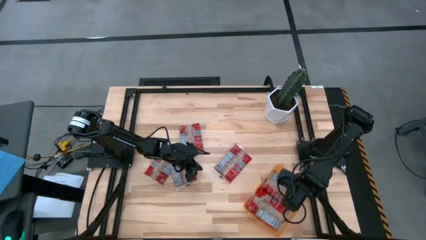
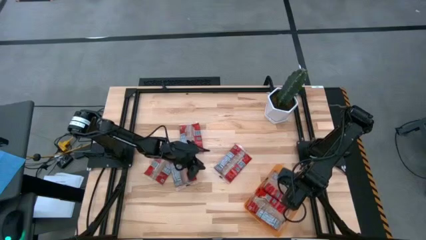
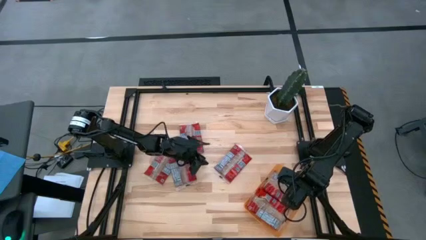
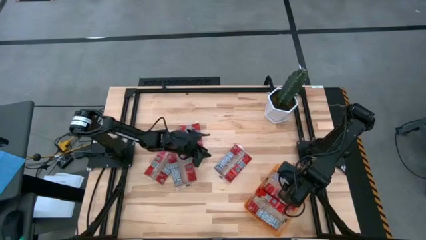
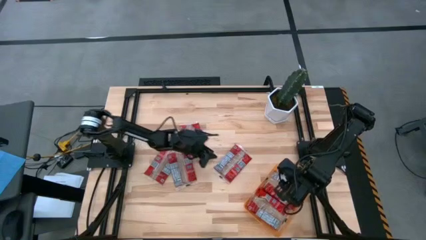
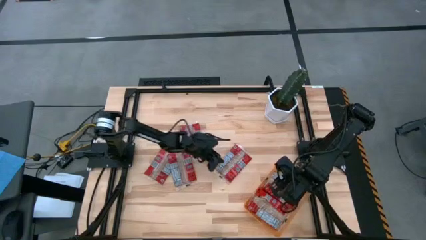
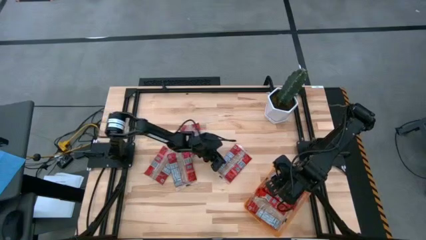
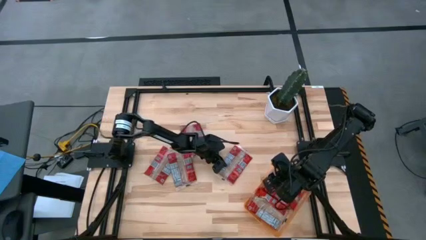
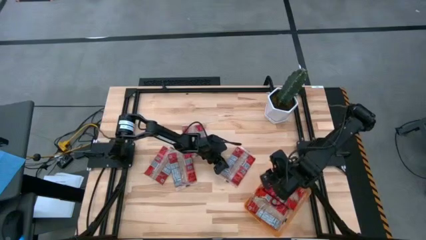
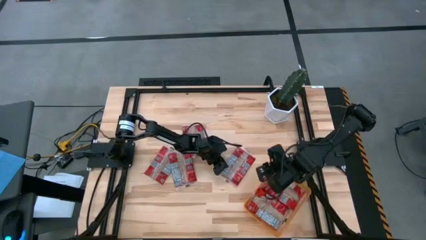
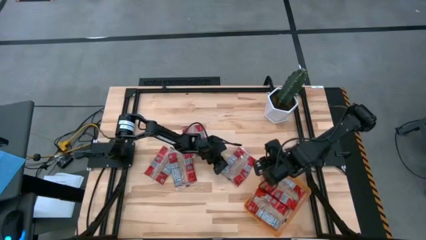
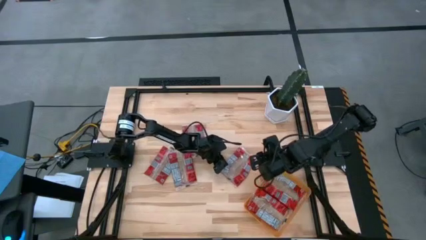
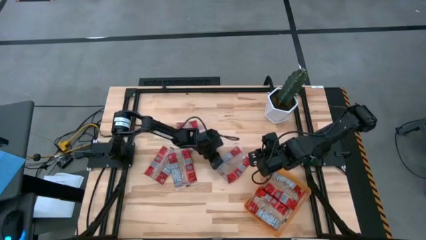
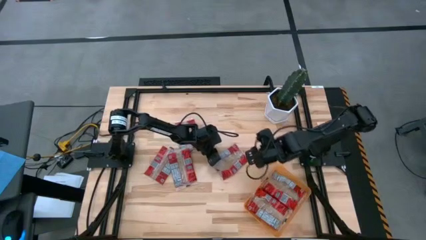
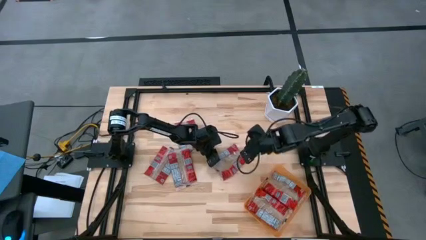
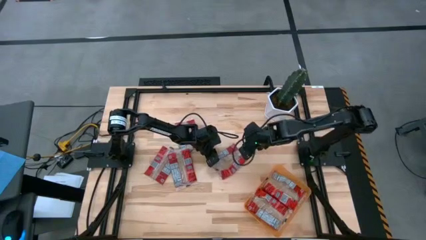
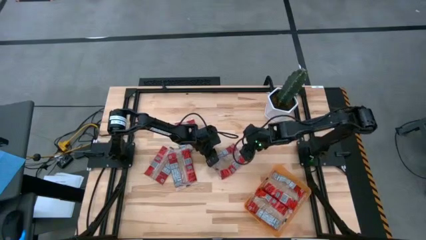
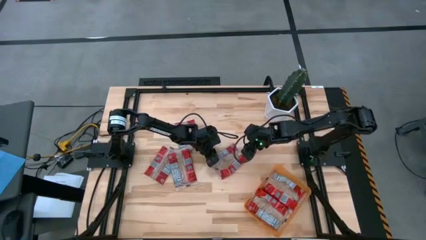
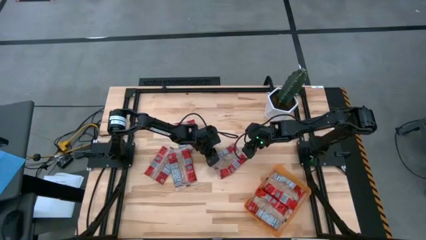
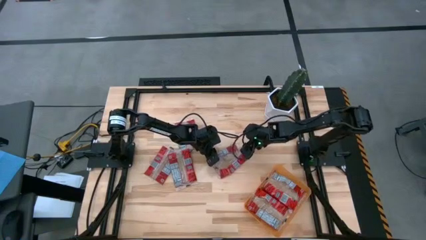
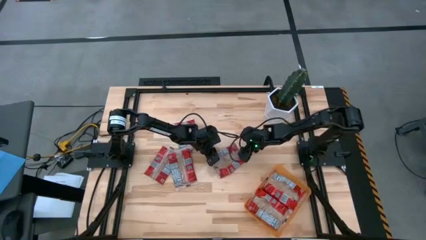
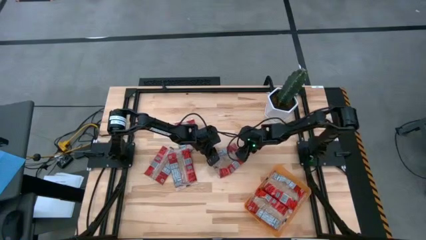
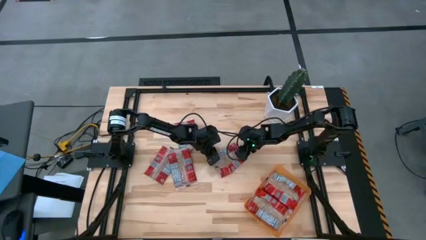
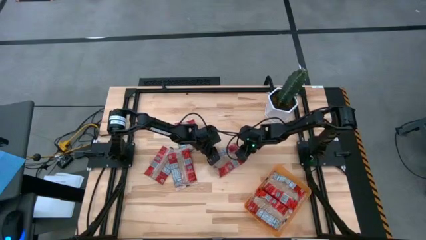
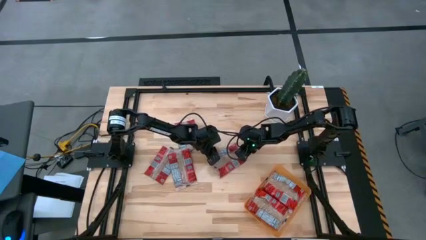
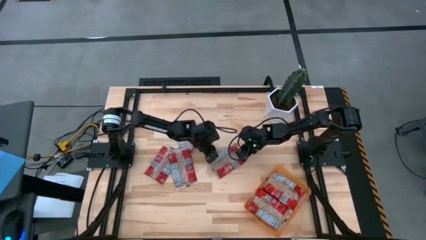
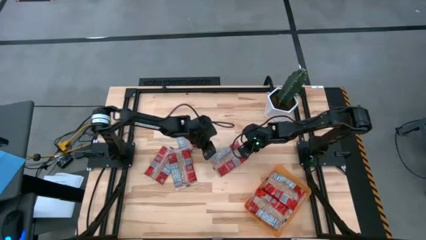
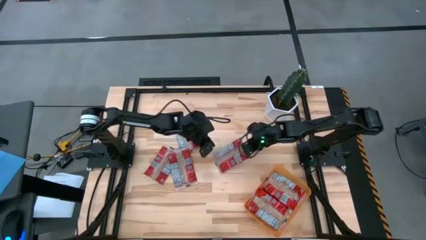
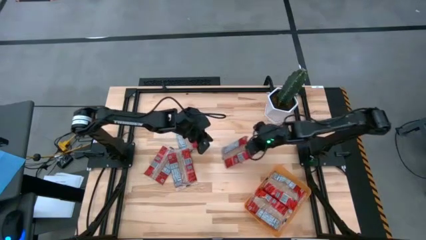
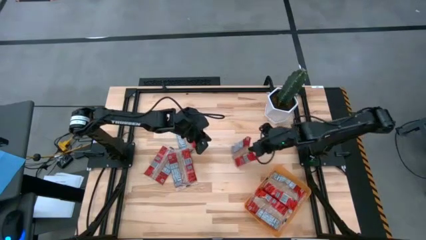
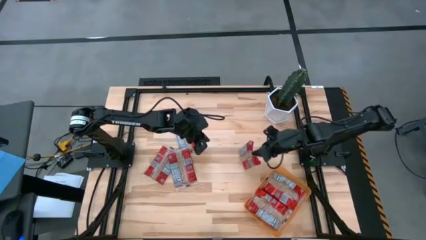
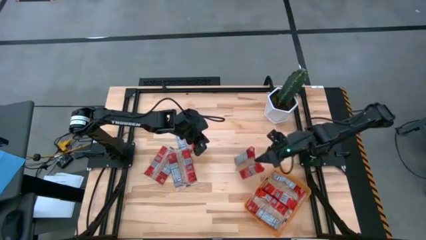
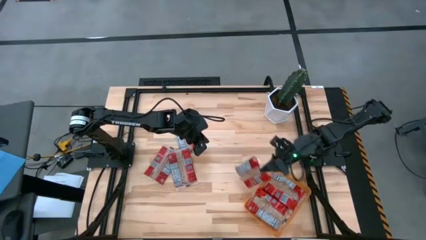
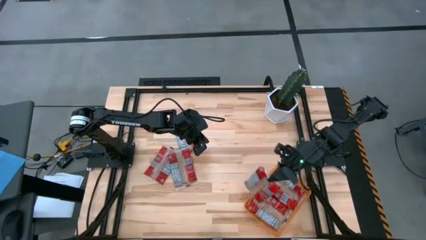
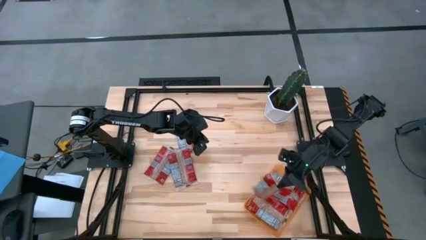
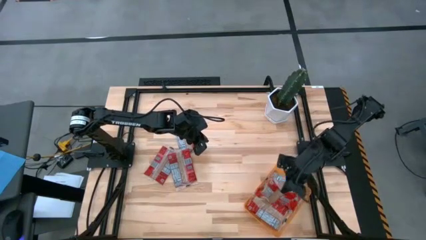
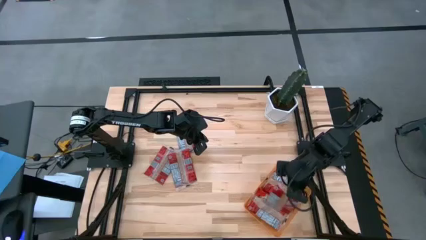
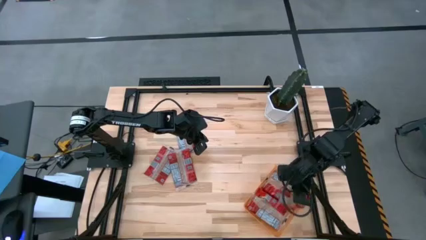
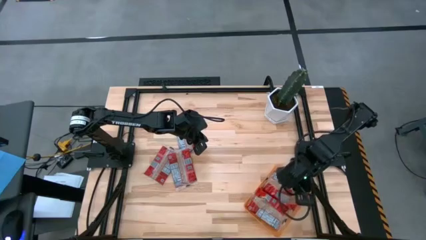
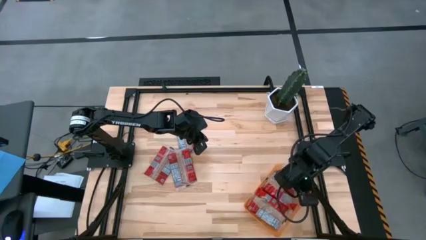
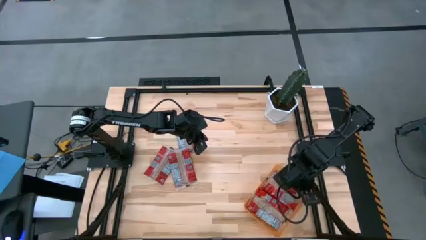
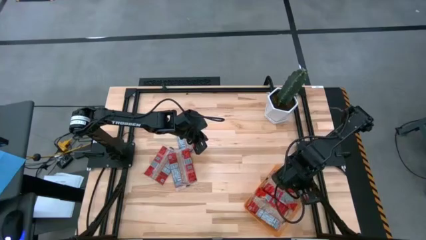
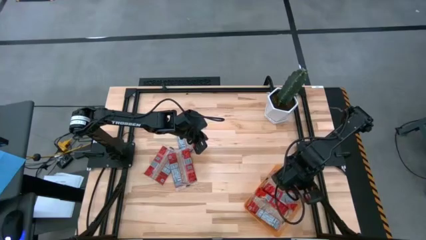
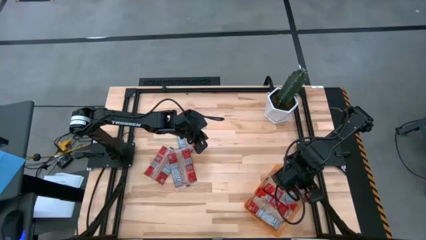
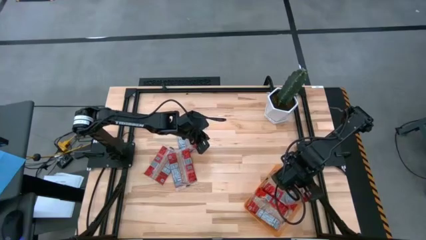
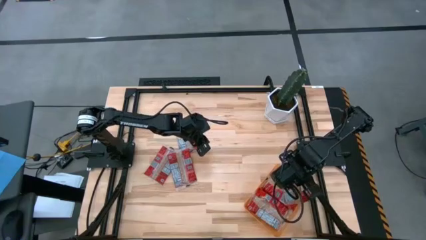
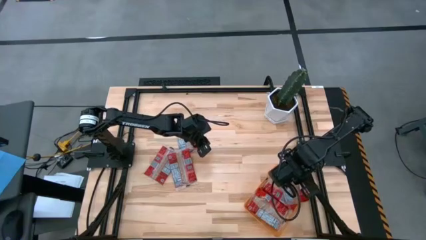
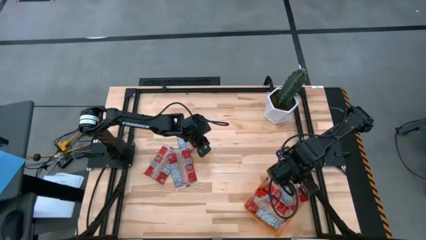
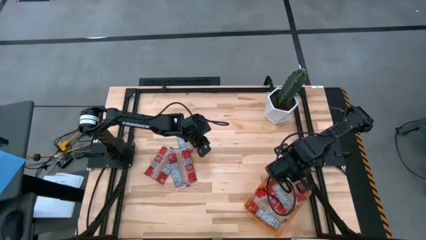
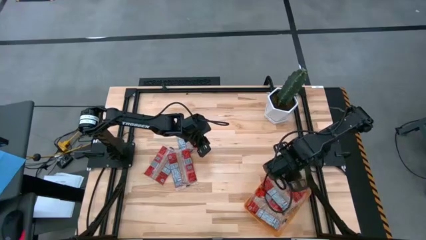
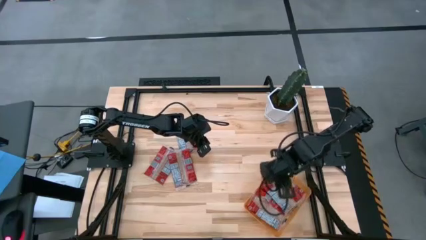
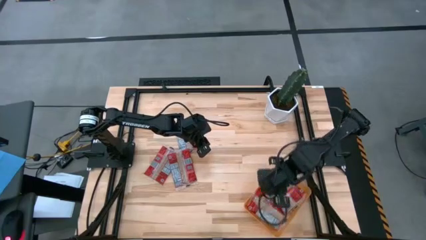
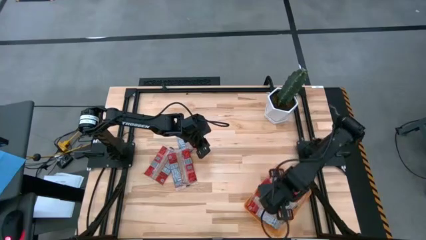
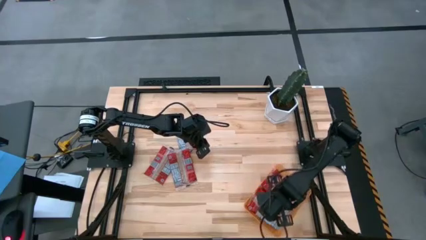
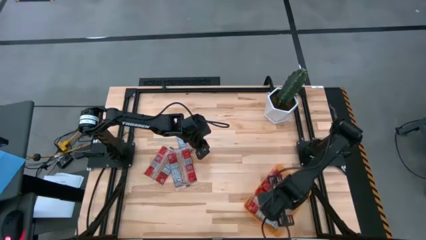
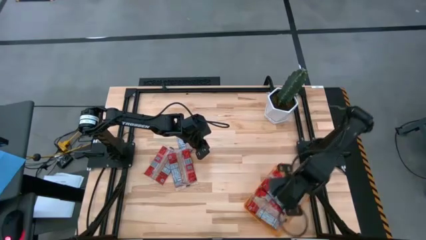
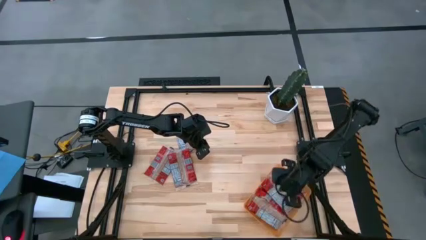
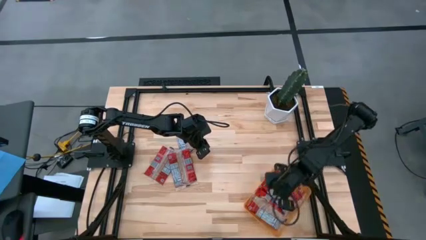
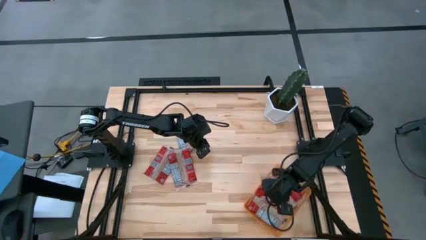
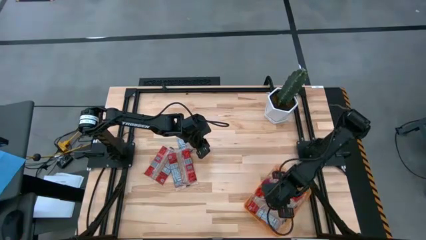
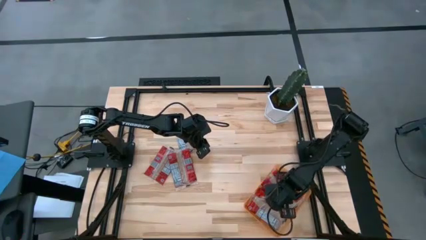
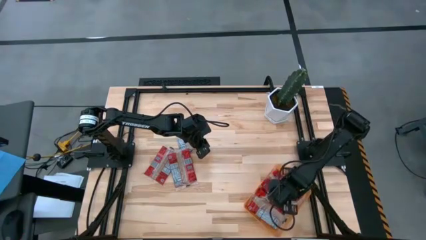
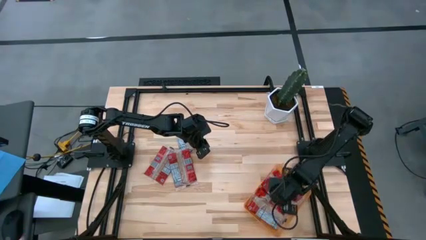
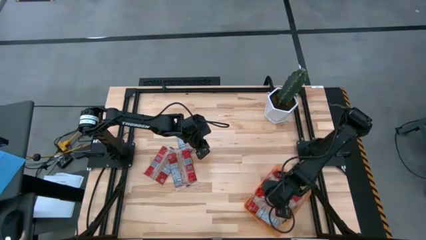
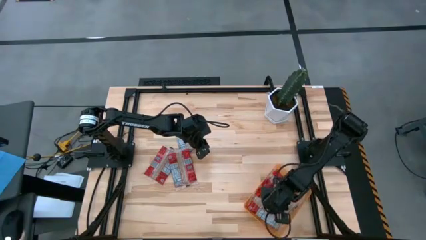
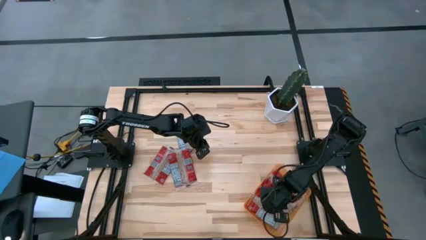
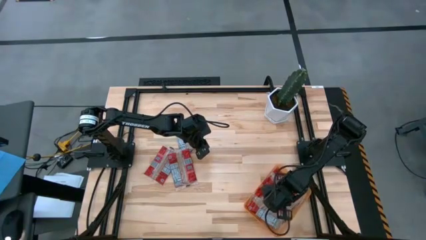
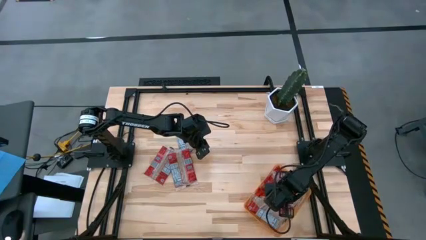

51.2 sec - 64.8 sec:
Task: Sort popcorn bags into baskets
Put the red popcorn bag into the orange bin

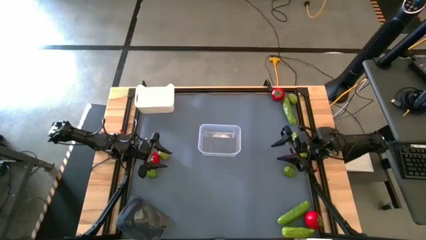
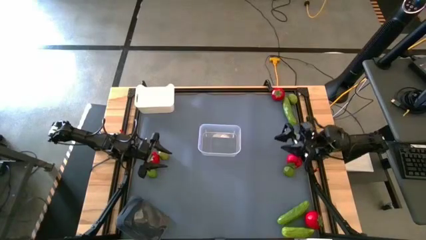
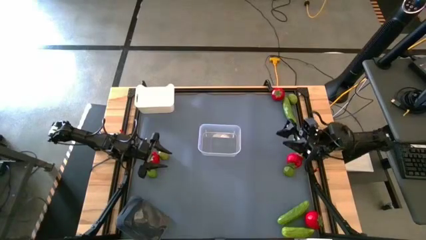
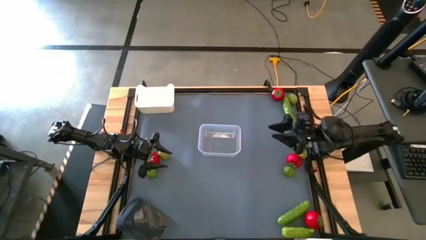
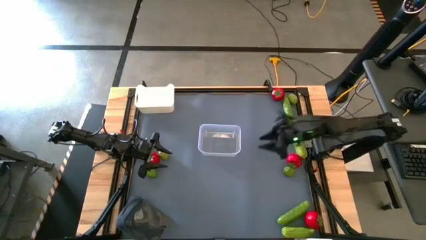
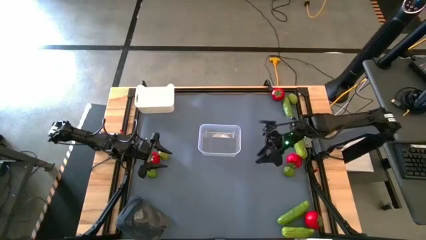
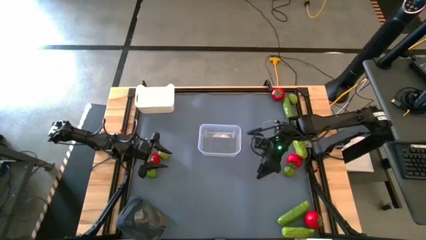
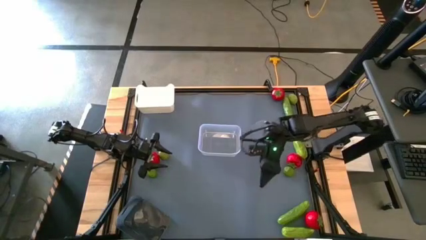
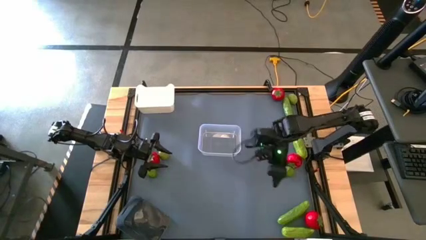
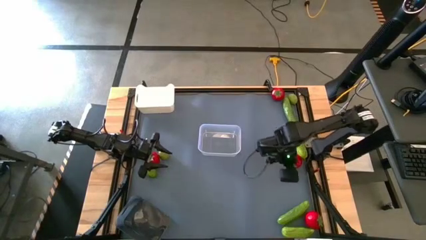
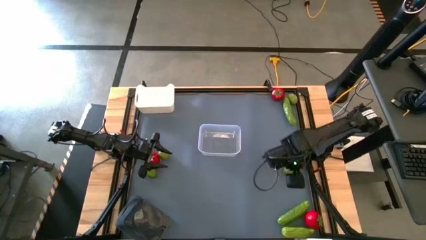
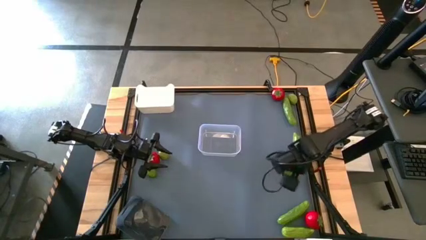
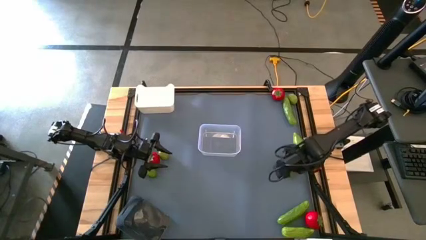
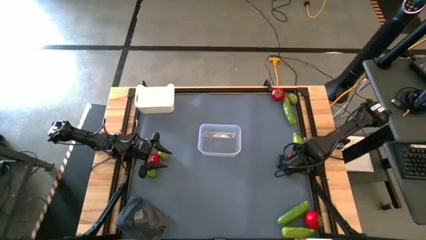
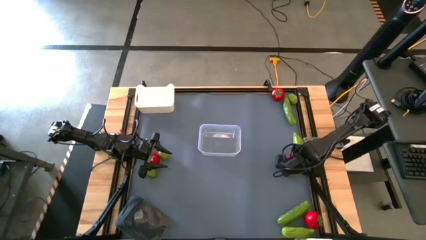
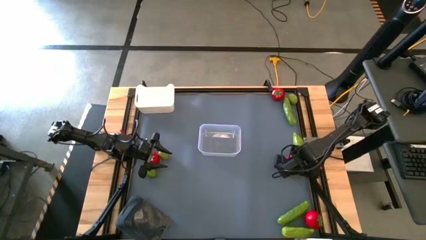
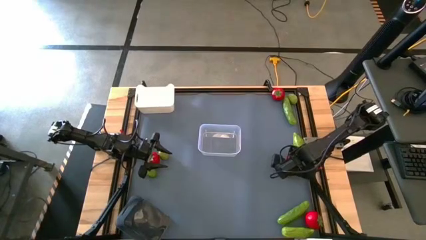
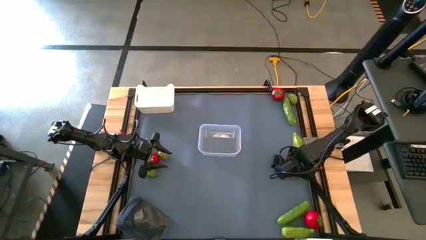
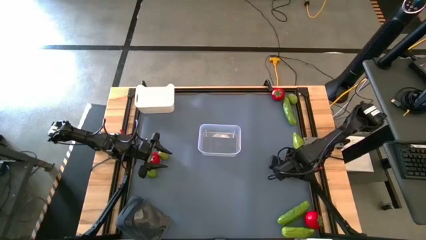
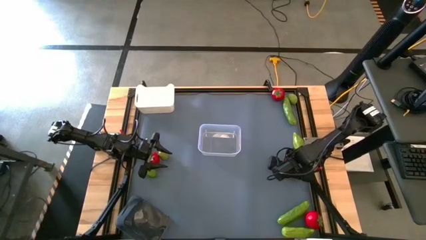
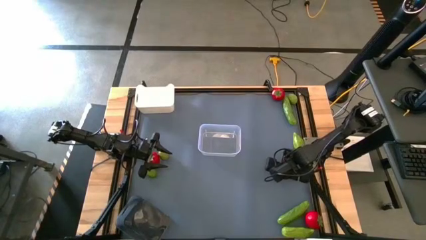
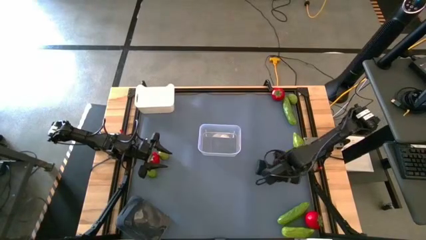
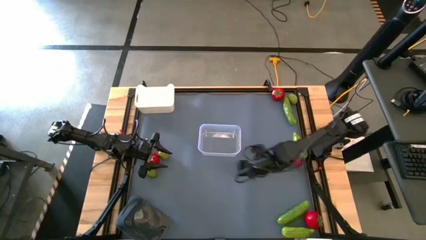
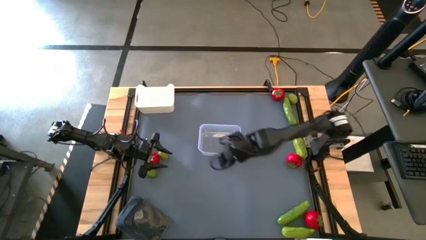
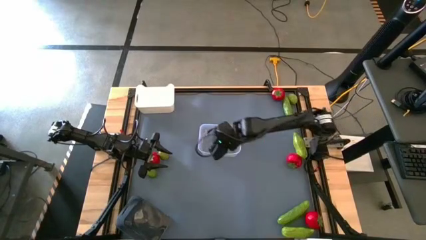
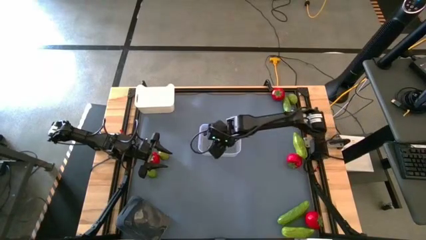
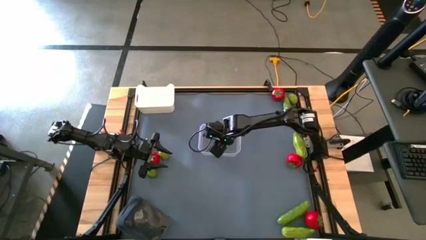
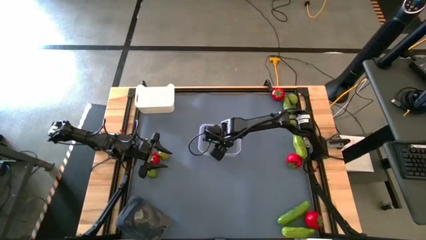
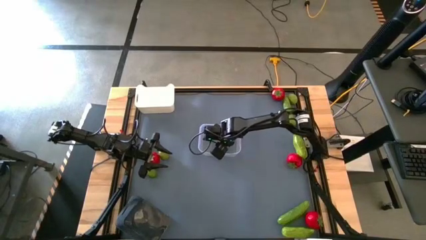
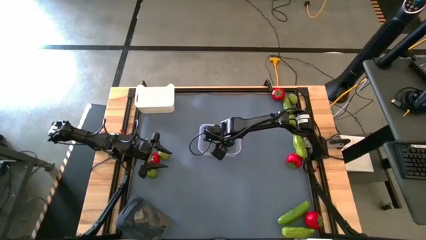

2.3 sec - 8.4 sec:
Task: Sort produce into baskets
Put the middle right lemon into the transparent bin
